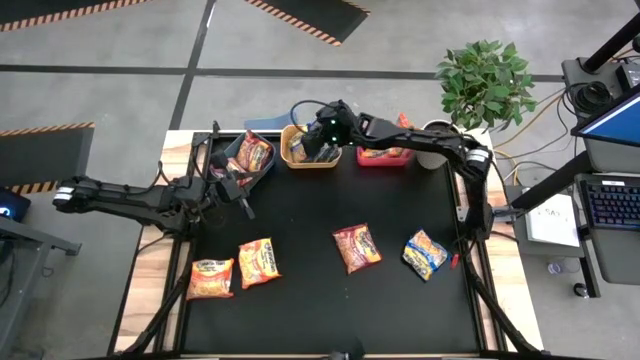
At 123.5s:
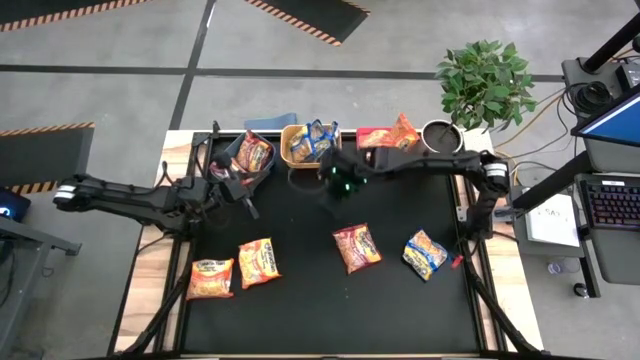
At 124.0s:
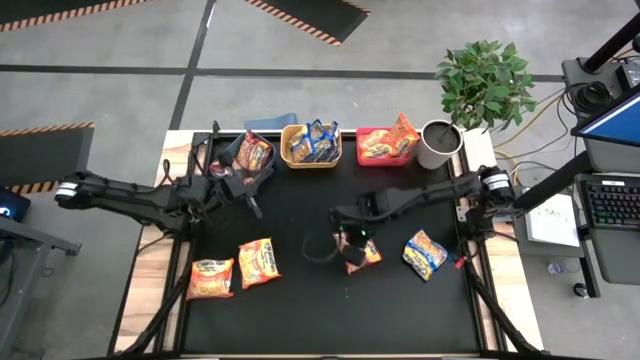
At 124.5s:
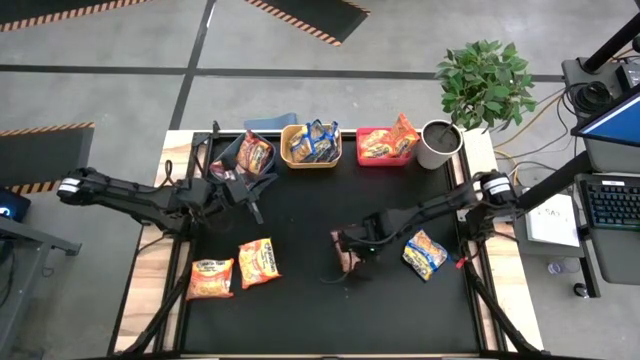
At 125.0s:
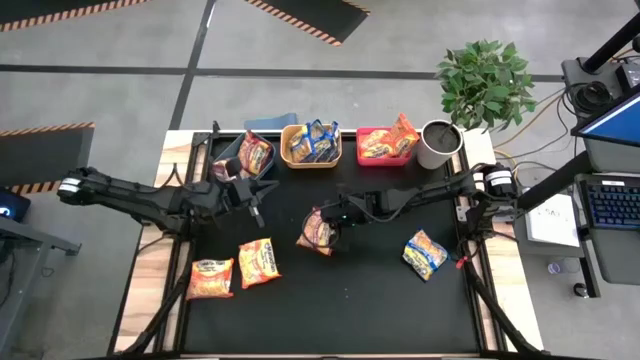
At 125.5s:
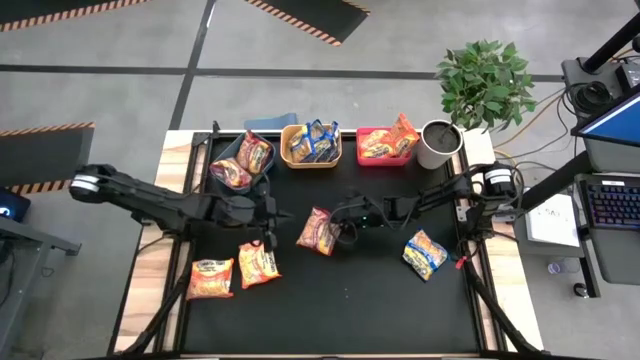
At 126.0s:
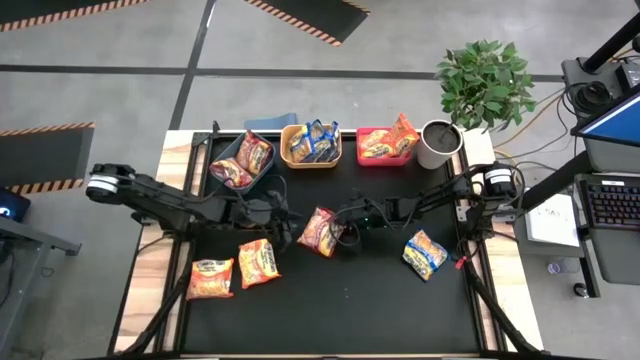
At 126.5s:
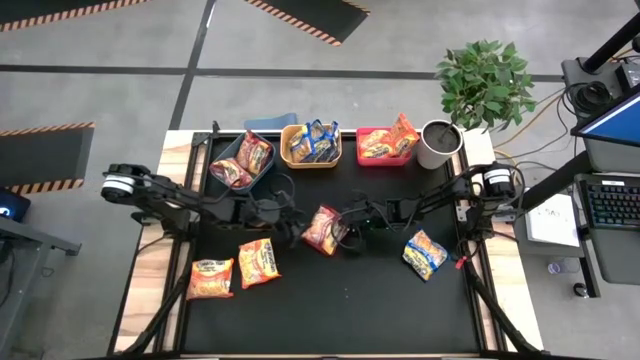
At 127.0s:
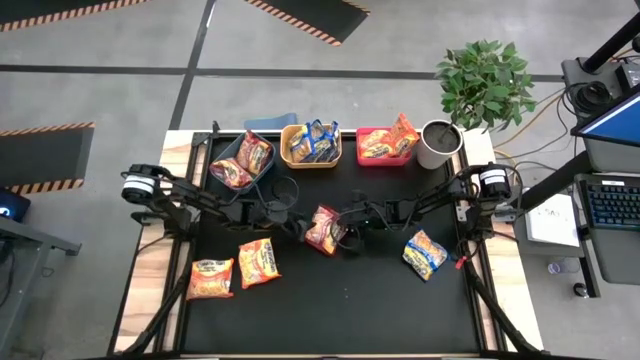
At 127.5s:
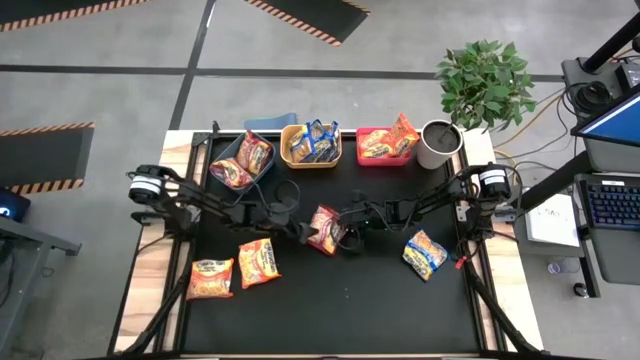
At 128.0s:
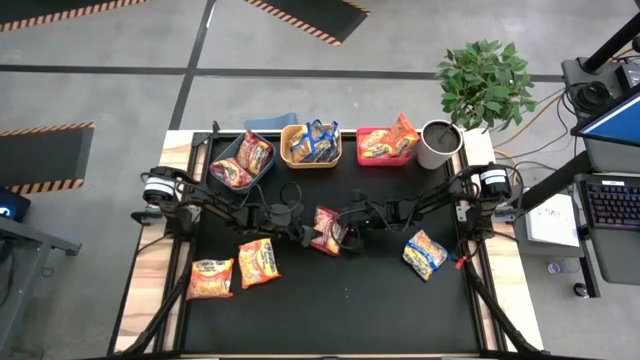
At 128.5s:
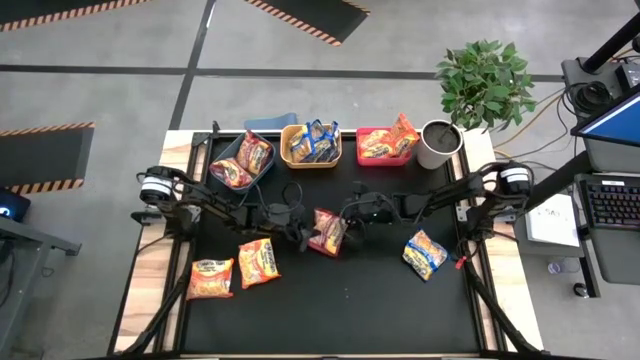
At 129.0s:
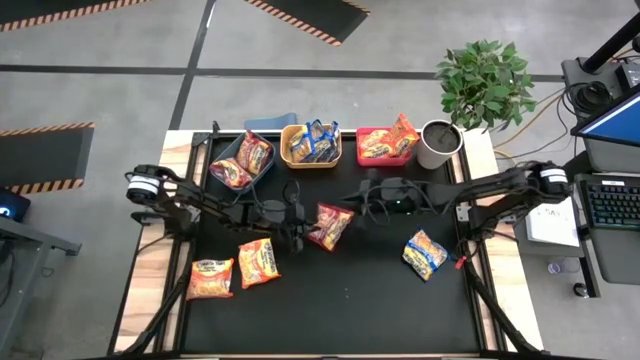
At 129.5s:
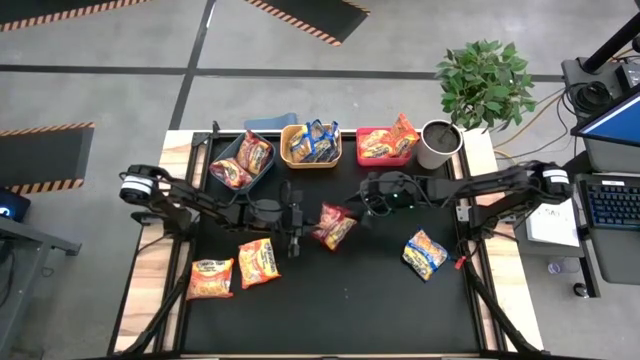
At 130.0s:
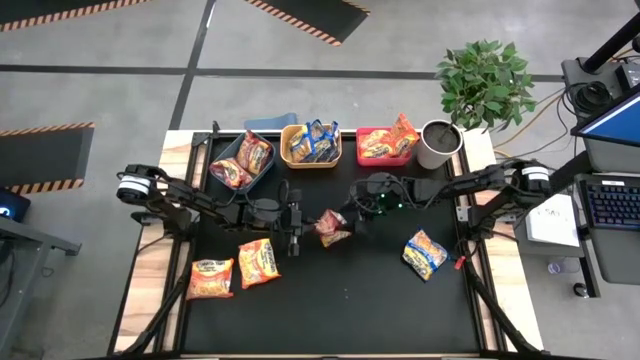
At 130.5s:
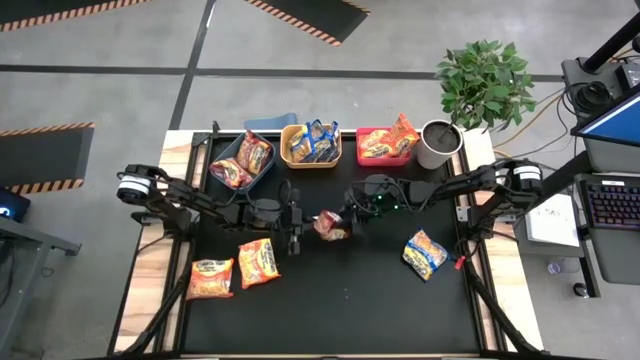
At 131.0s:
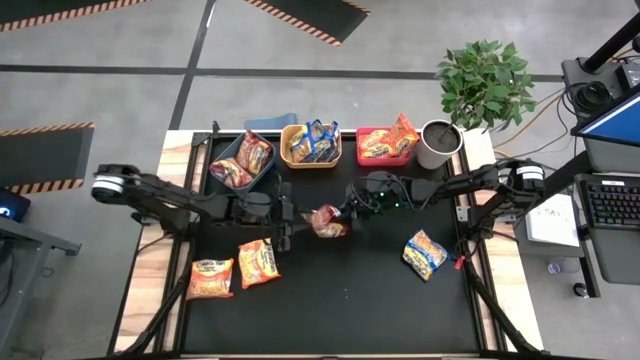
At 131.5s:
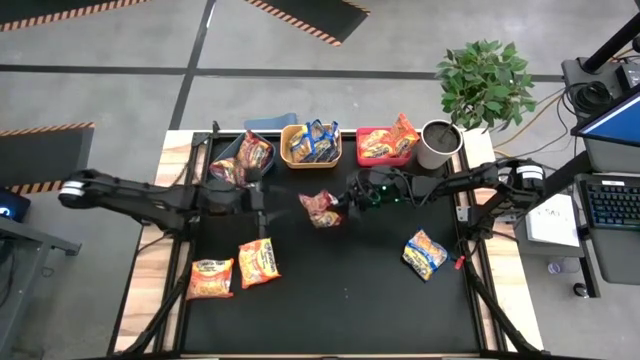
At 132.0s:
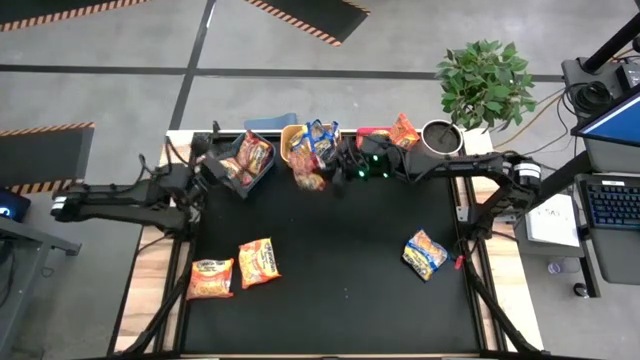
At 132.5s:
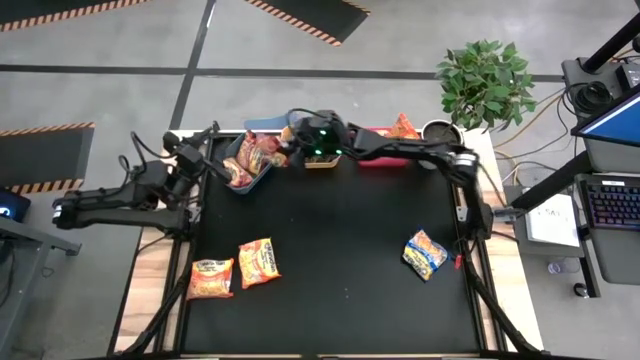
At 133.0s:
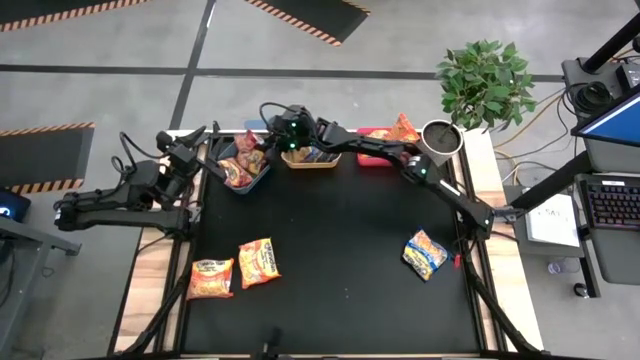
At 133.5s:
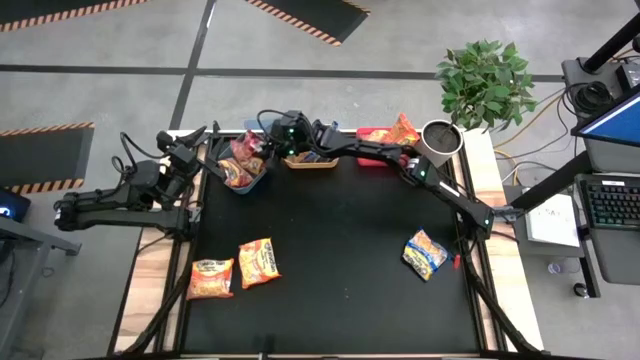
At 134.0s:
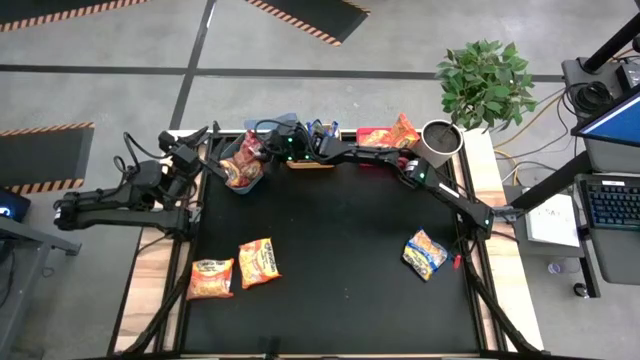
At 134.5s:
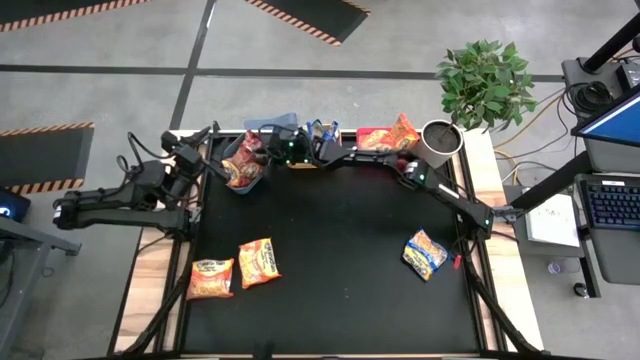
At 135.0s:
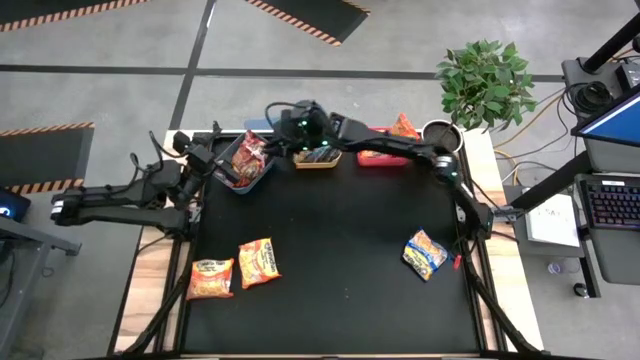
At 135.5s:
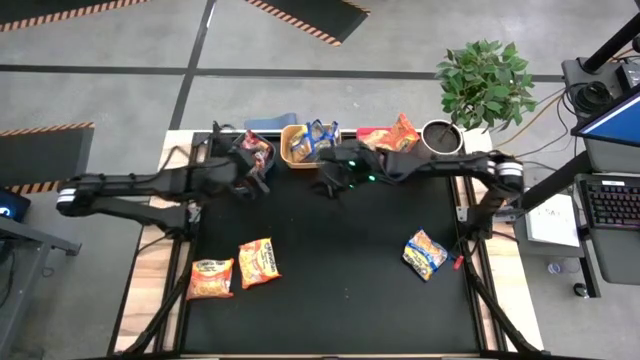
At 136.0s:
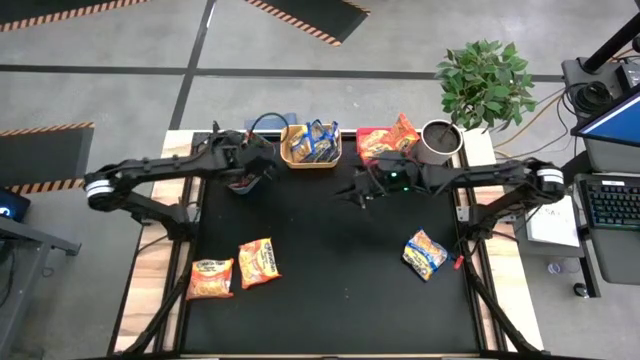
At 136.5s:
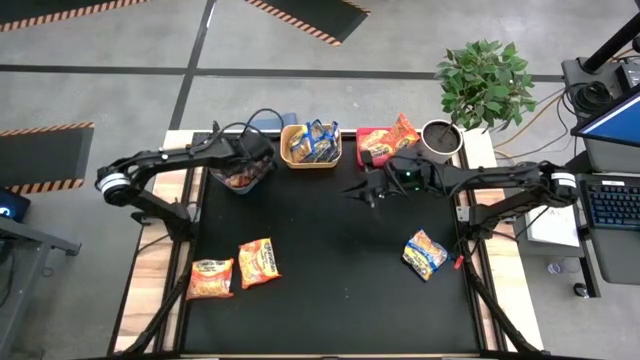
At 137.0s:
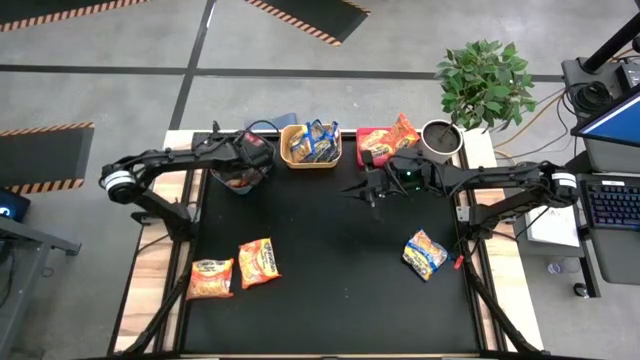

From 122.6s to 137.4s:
Task: Sort Maruchan noodles
Put the red noodle pack into the blue bin

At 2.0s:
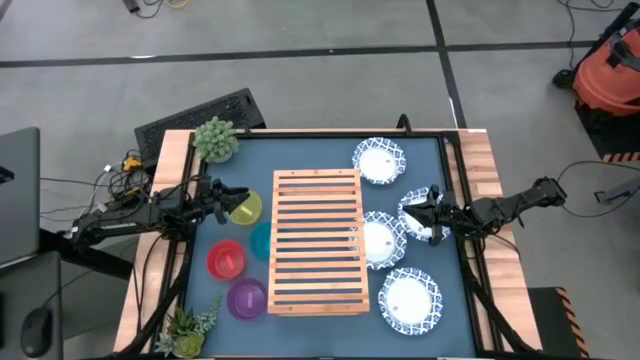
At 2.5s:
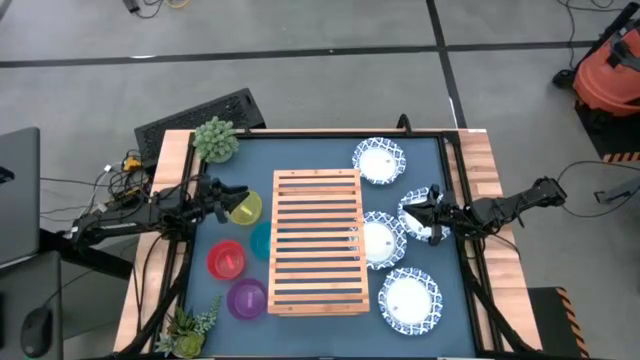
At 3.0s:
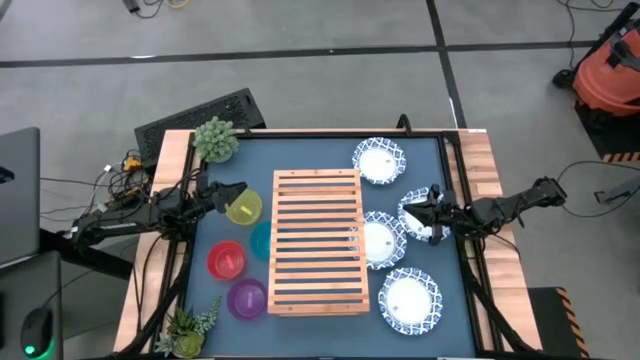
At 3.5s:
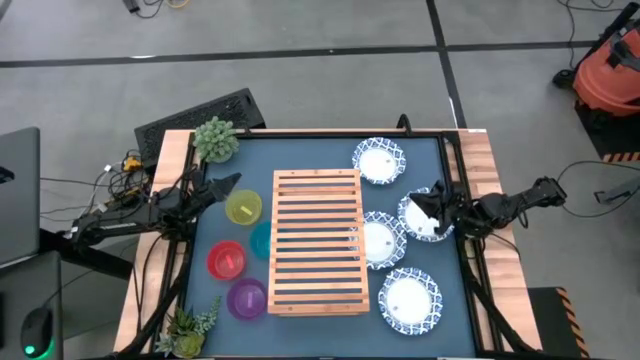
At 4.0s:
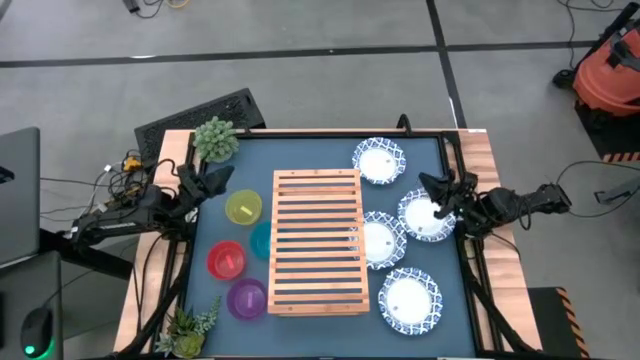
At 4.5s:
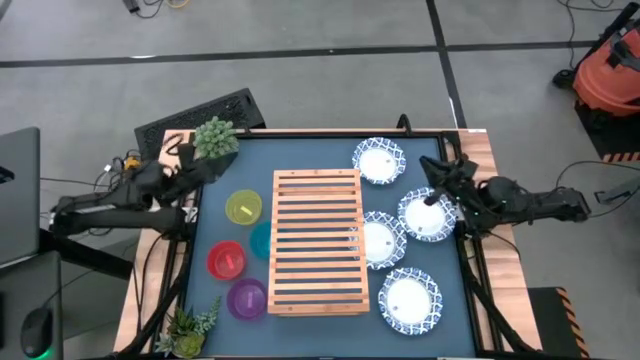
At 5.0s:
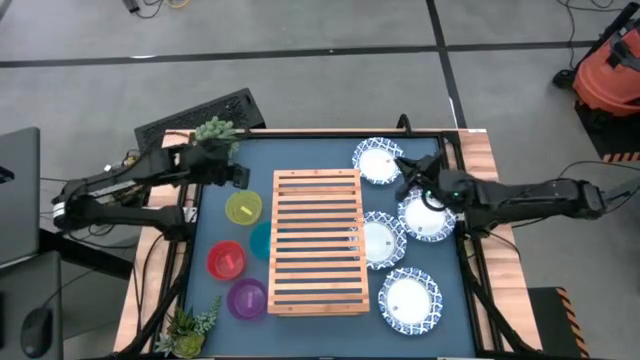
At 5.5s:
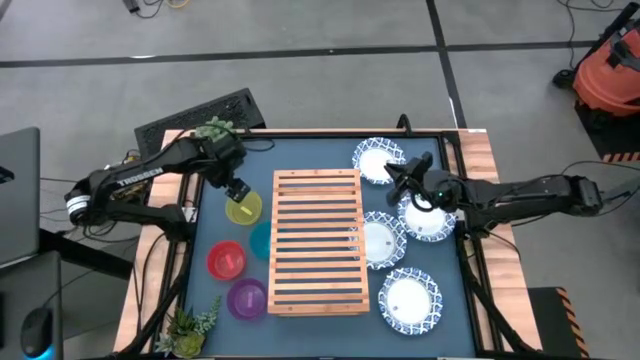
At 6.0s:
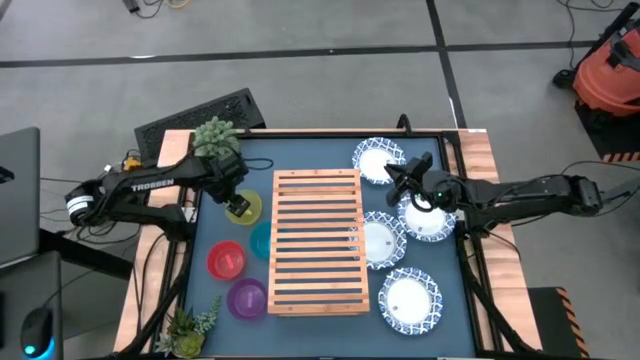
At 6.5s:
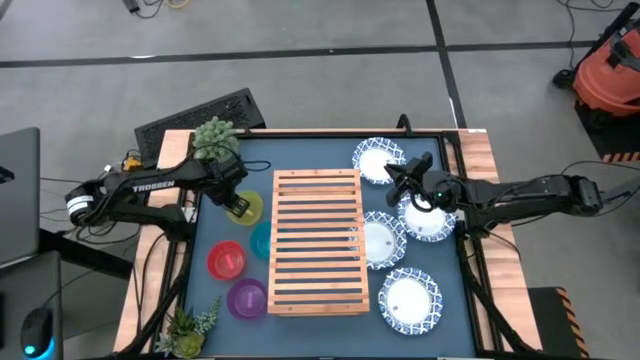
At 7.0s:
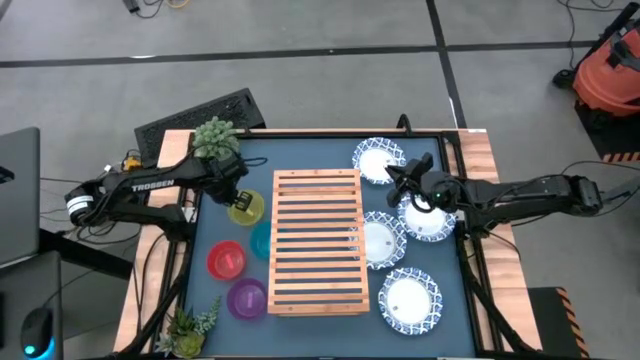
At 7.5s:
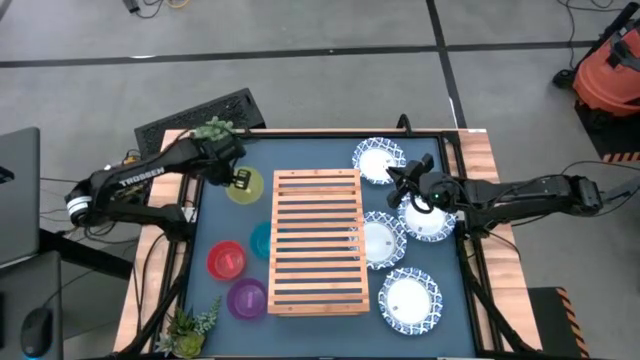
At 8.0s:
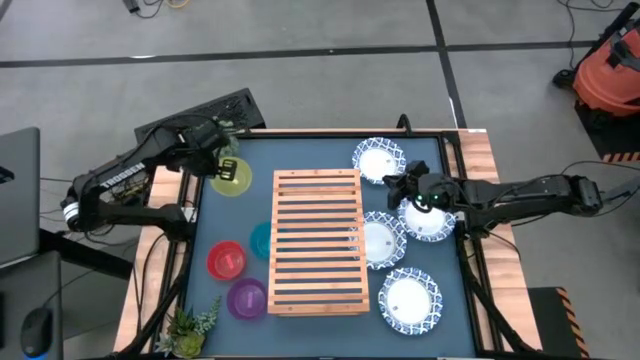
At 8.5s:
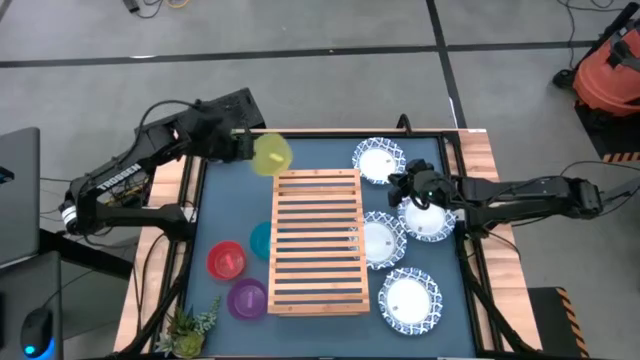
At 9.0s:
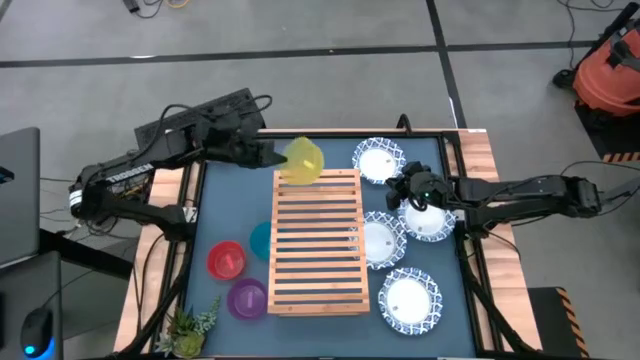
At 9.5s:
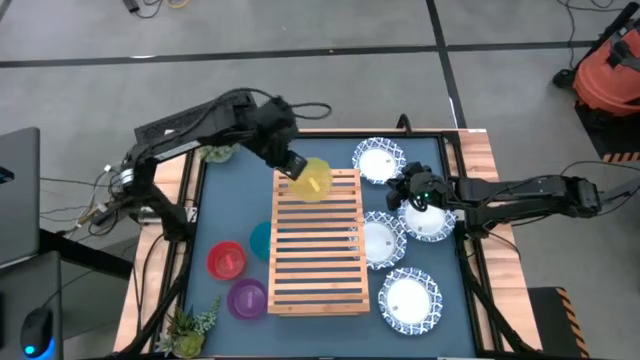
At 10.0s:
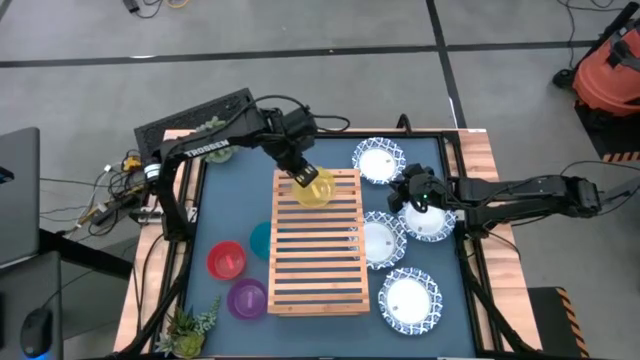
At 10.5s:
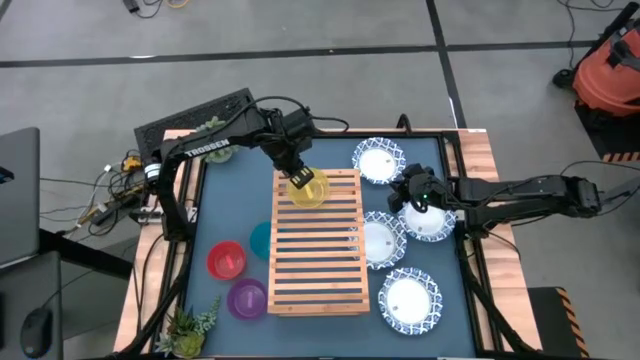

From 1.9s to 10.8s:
Task: Place and stack bowls onto a shelf
Put the small yellow bowl on the shelf
